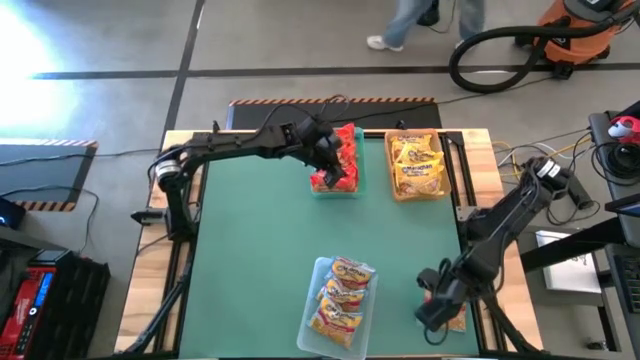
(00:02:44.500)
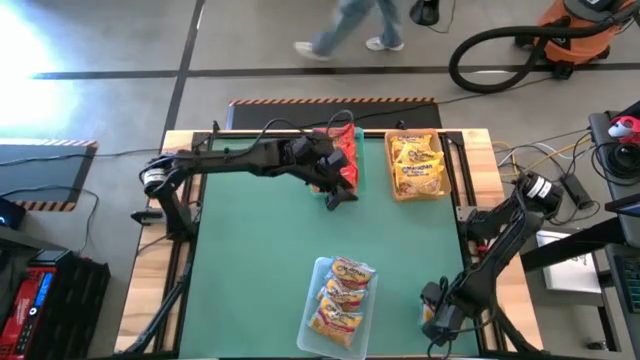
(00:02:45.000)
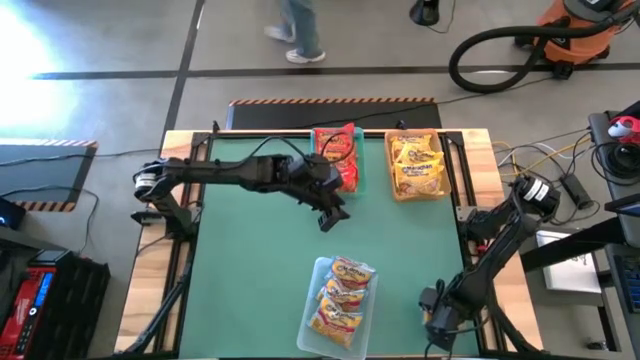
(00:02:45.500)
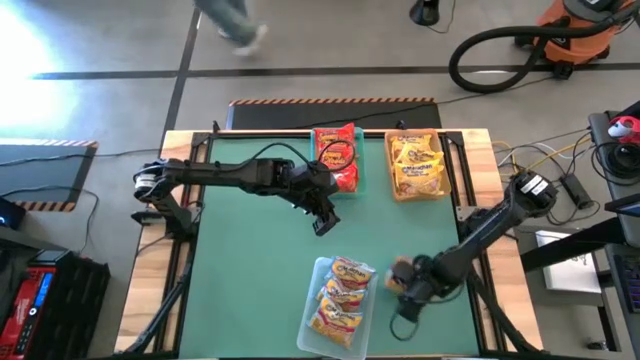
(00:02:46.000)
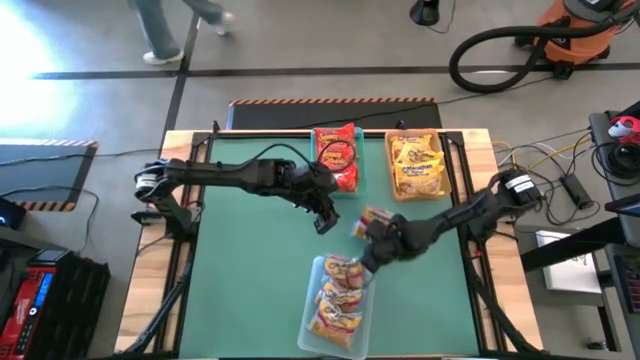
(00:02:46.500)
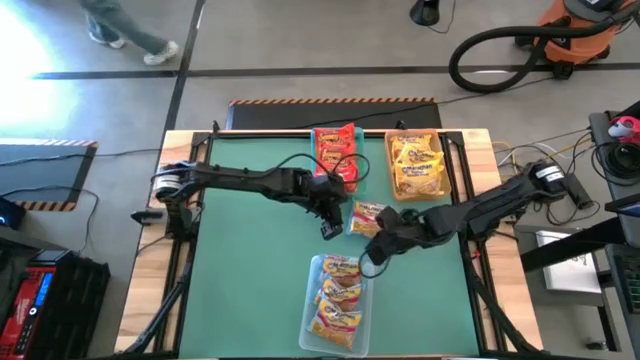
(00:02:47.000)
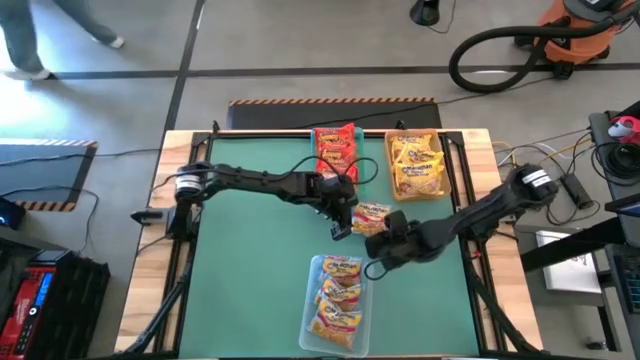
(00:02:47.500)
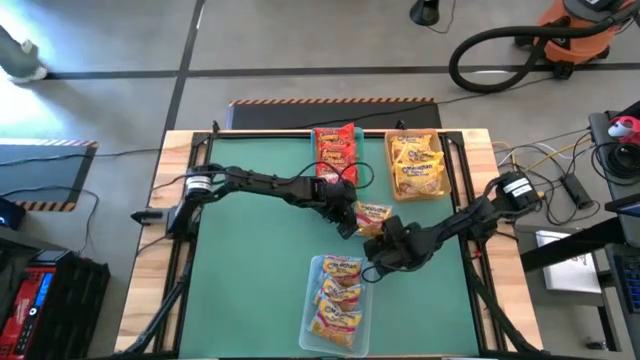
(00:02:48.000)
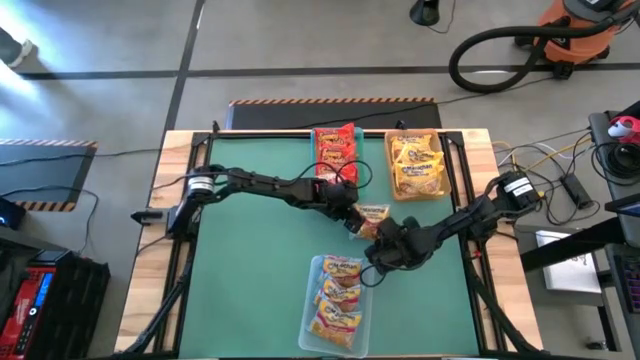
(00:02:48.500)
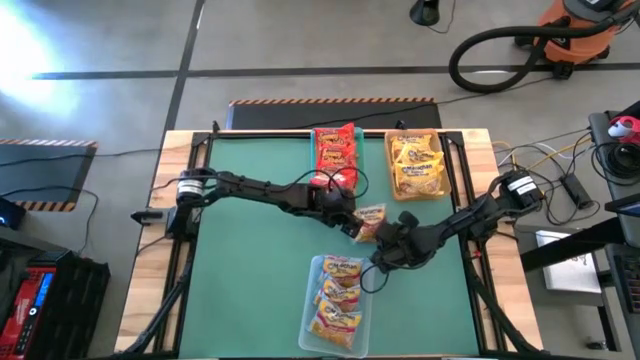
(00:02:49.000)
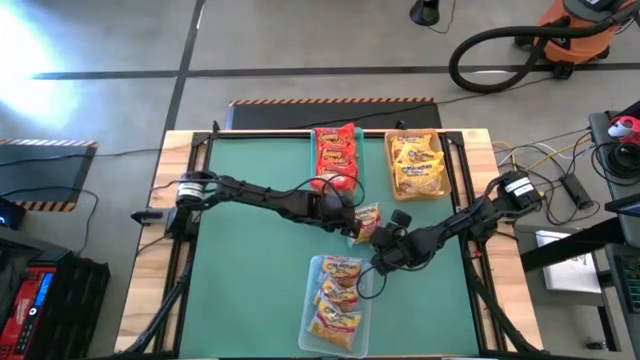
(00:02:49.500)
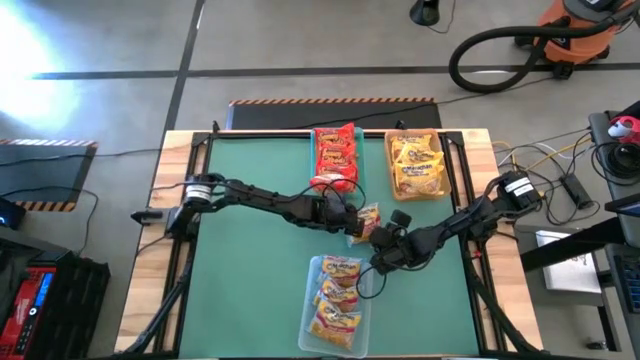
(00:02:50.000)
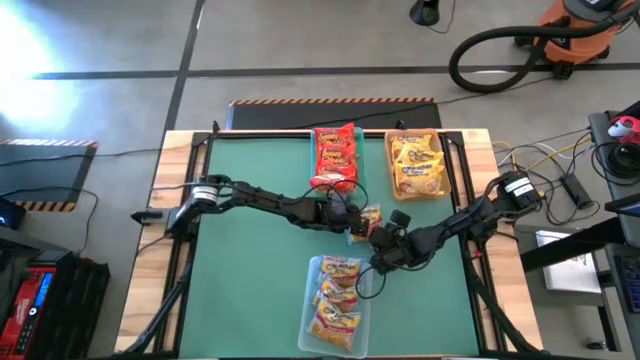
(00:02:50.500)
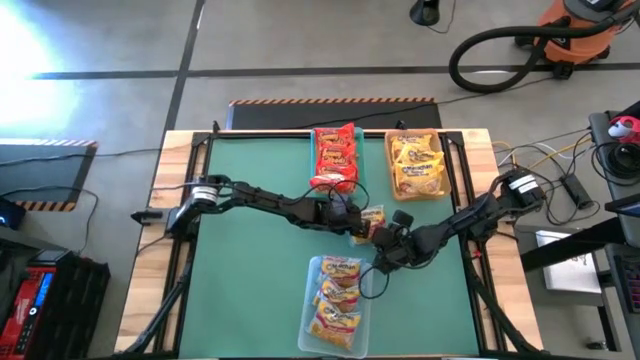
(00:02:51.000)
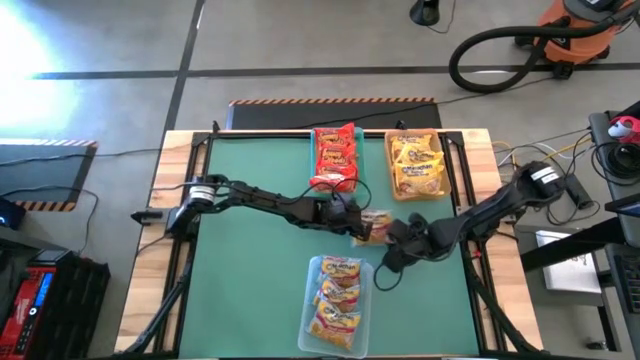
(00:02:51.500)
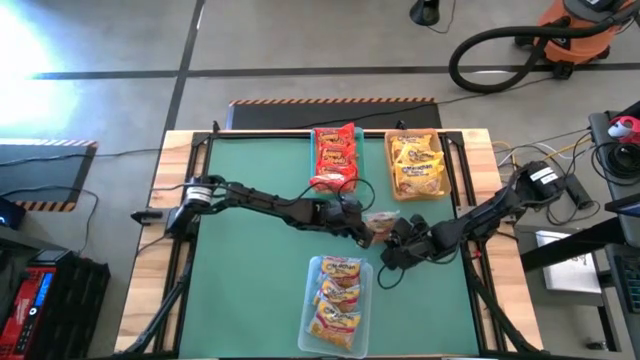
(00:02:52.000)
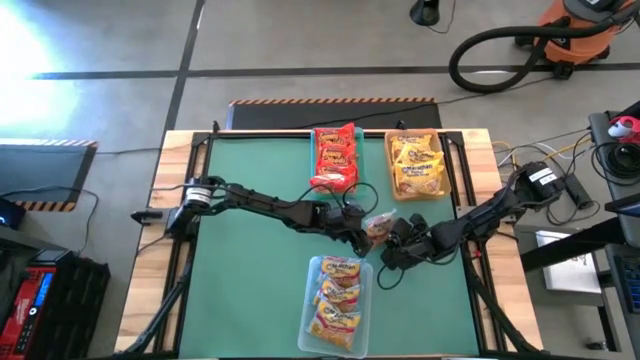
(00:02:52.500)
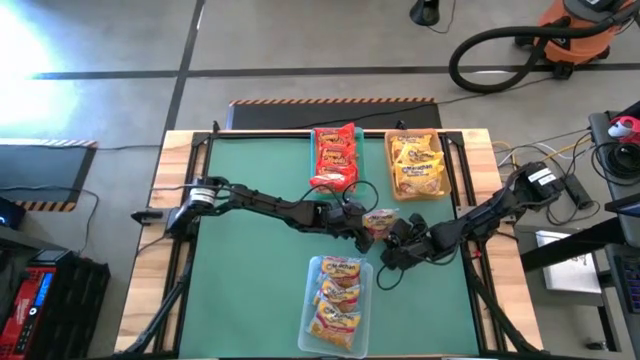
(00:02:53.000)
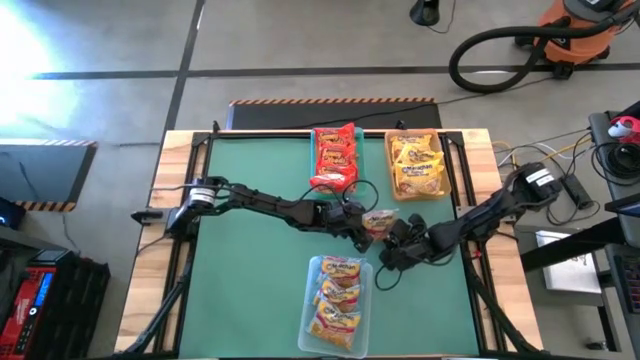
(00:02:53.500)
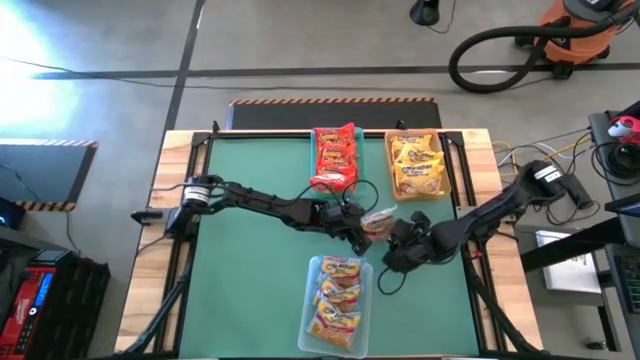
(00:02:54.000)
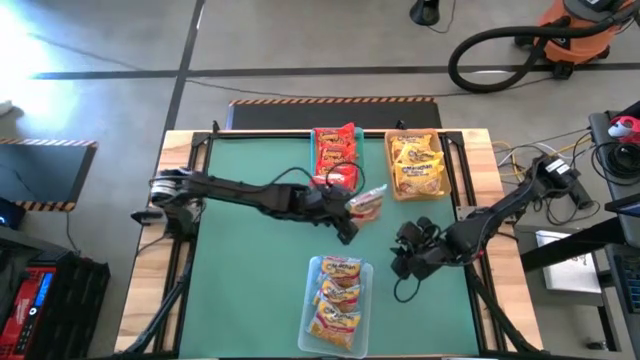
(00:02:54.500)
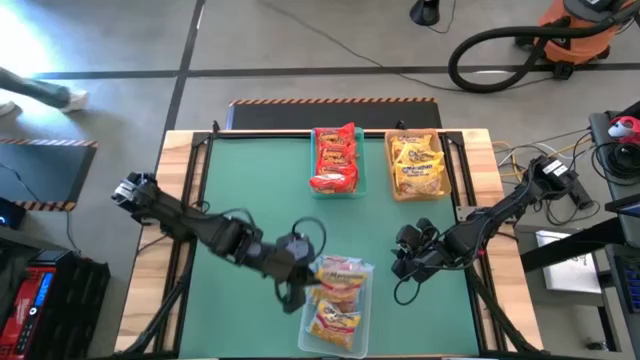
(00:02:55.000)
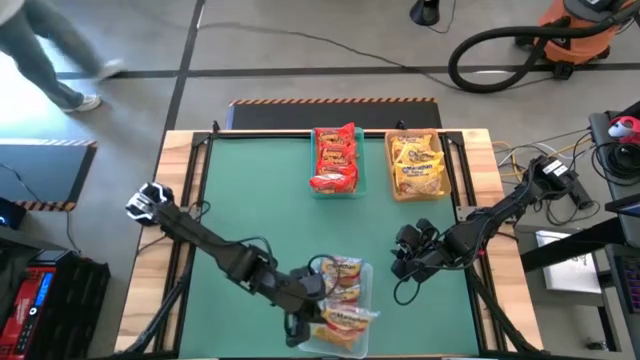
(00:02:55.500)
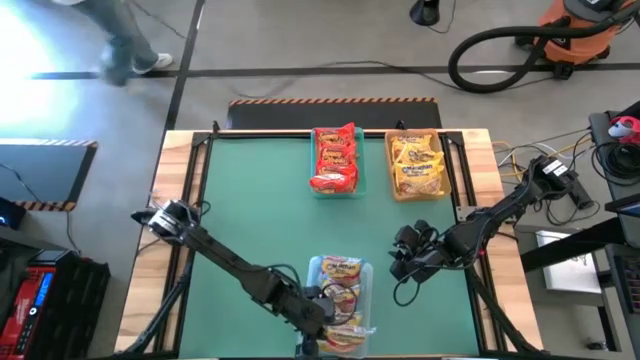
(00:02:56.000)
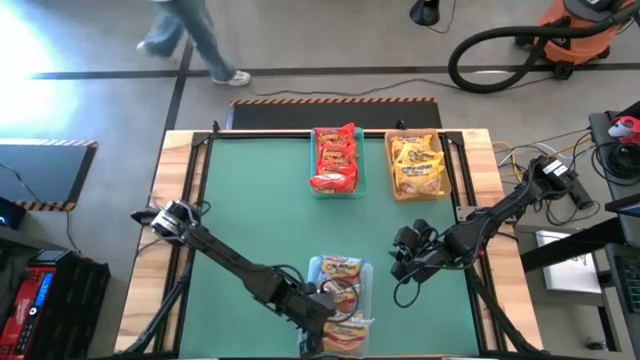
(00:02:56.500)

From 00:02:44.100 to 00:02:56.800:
Task: Sort Maruchan noodles
Put the blue noodle pack into the transparent bin

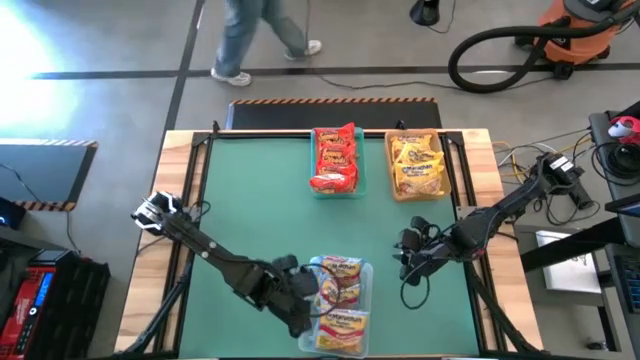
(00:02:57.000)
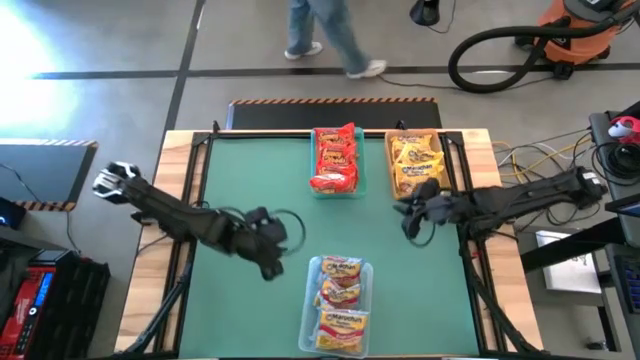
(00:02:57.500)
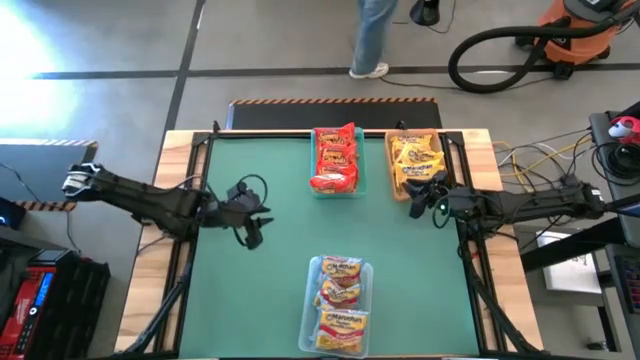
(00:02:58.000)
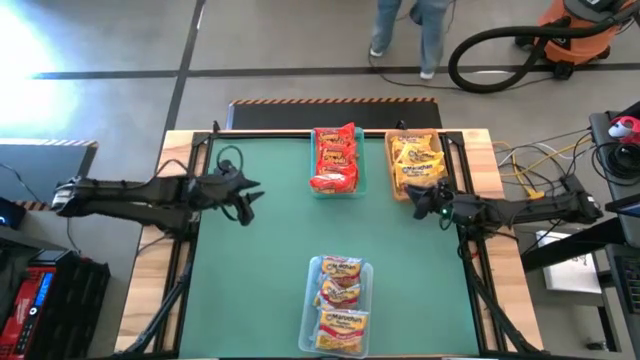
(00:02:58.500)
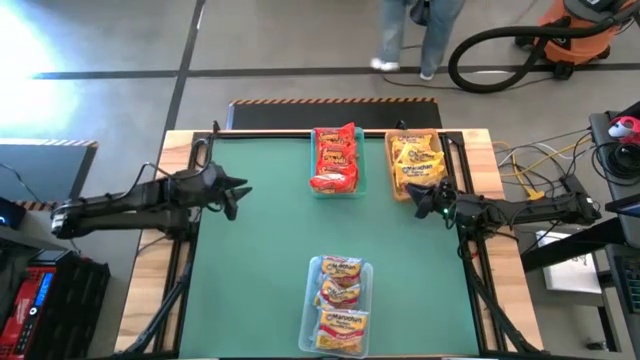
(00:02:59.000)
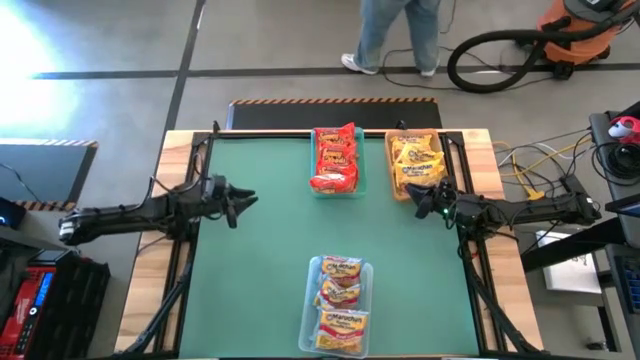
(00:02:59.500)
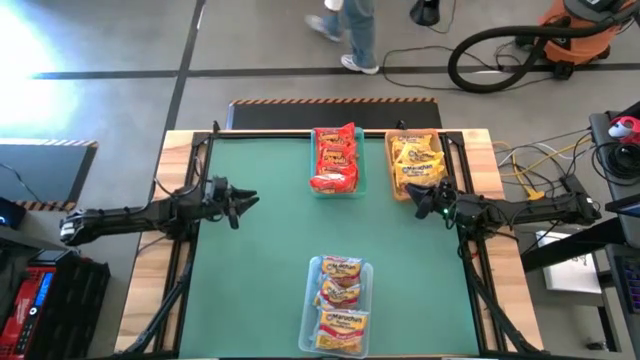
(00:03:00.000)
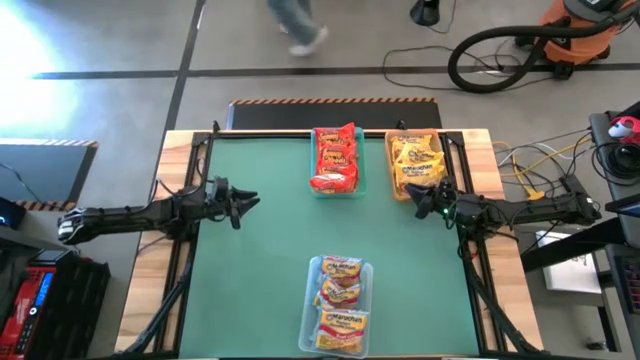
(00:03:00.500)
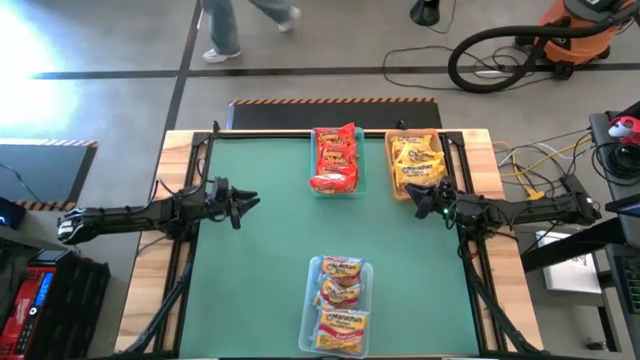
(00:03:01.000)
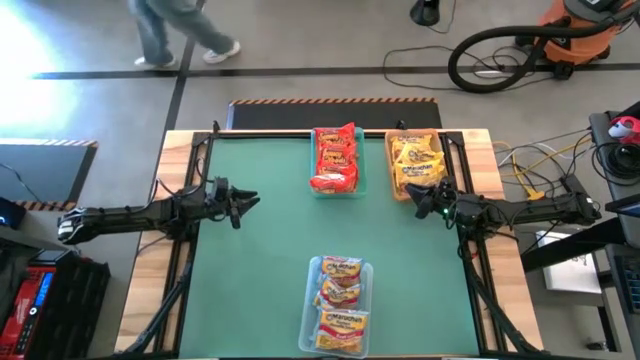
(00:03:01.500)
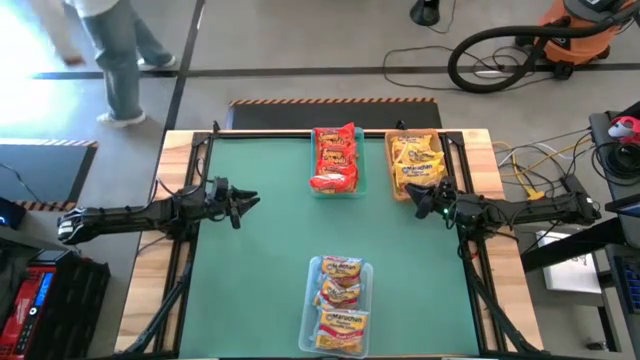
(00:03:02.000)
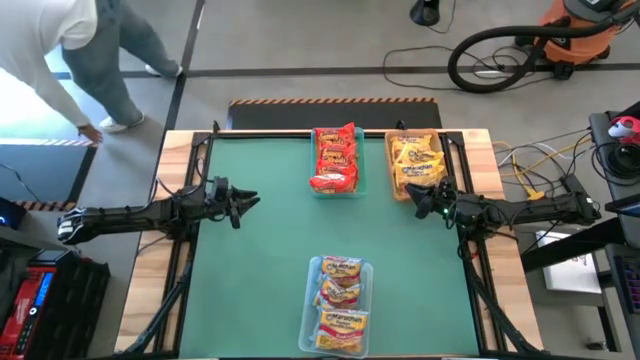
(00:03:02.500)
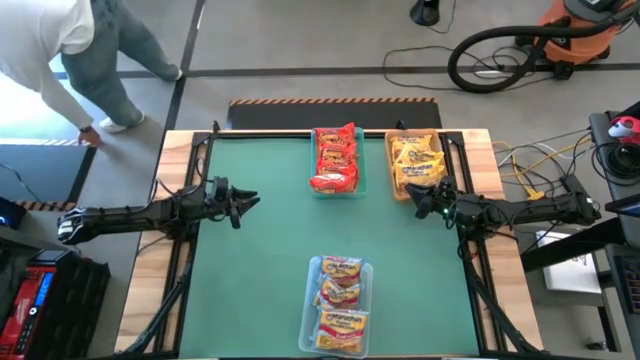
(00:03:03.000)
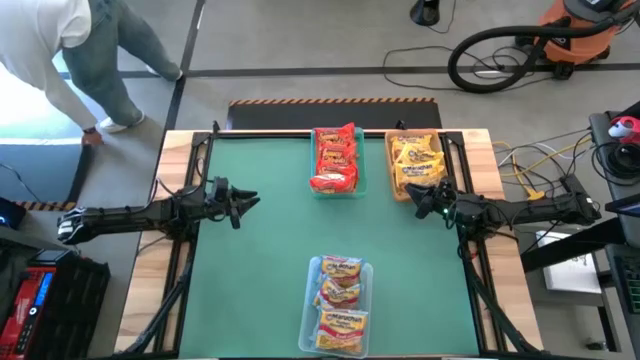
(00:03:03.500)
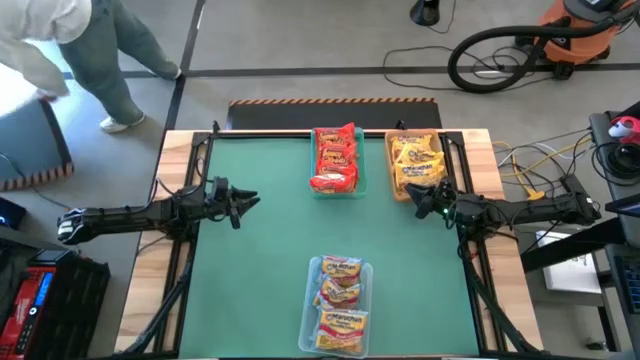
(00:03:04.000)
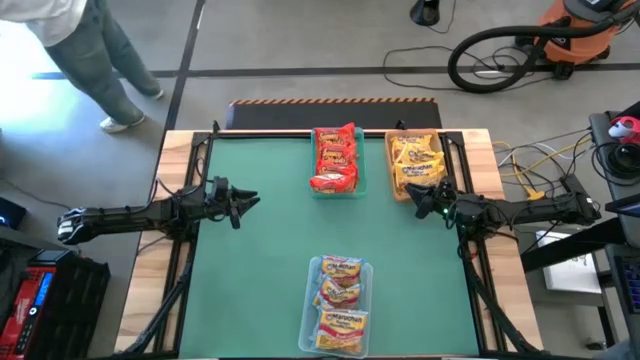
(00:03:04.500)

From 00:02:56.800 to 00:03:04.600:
Return to Home Position
